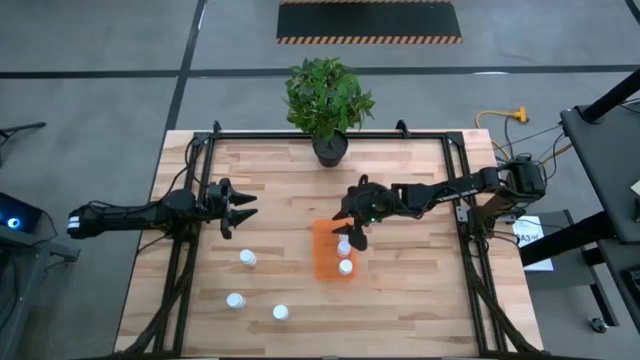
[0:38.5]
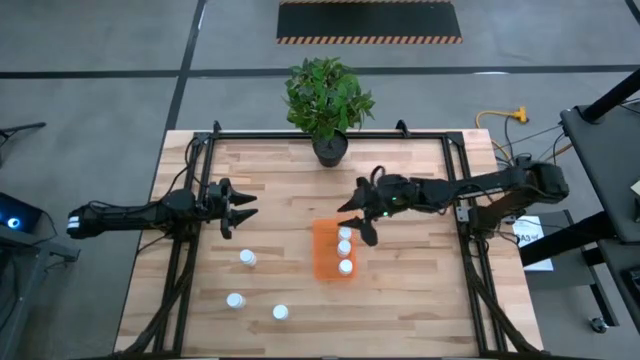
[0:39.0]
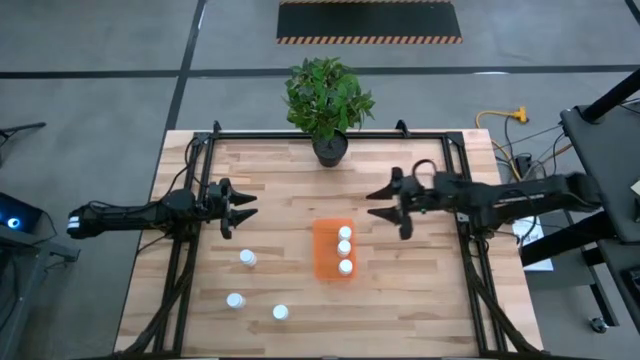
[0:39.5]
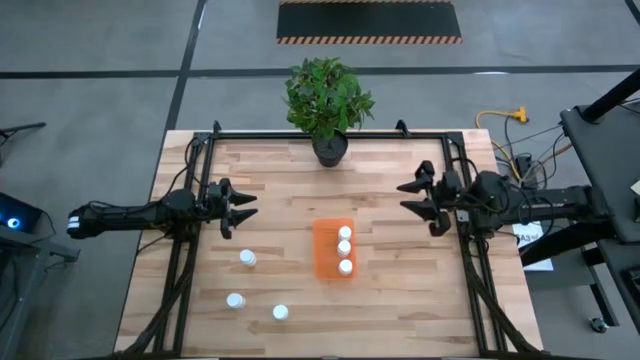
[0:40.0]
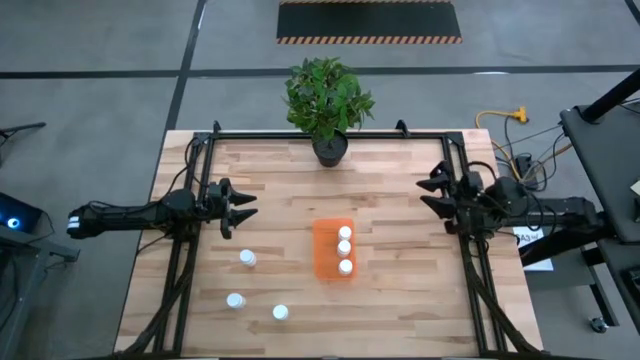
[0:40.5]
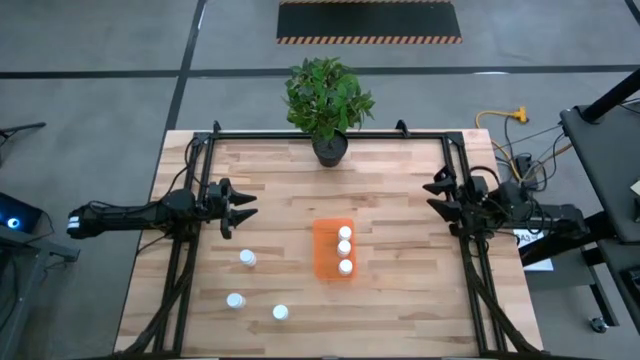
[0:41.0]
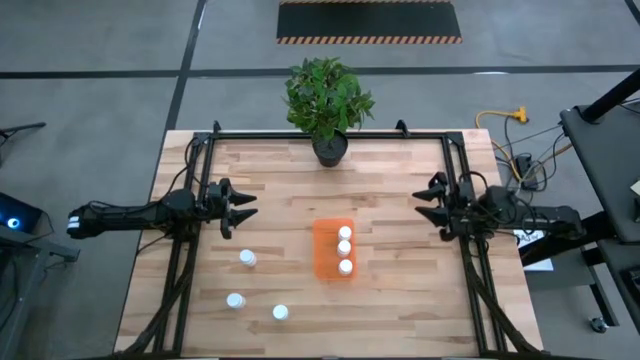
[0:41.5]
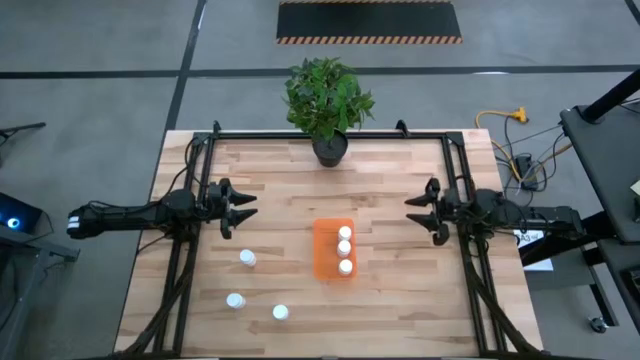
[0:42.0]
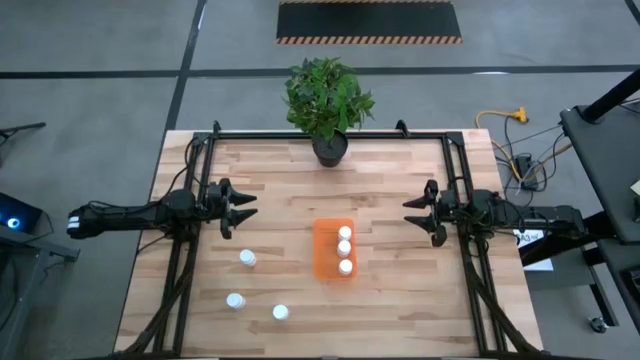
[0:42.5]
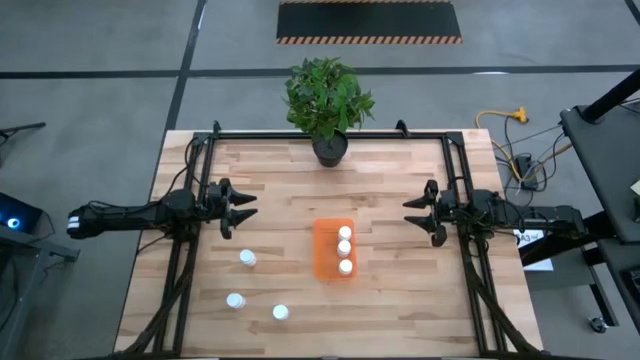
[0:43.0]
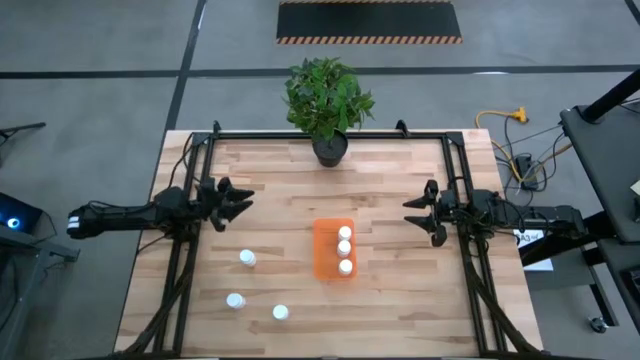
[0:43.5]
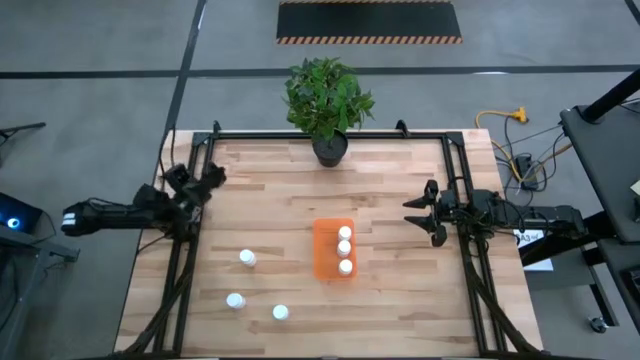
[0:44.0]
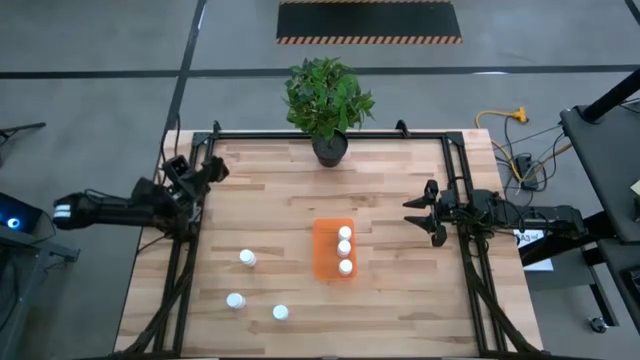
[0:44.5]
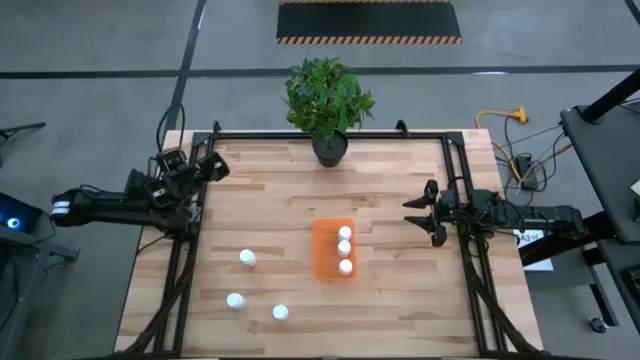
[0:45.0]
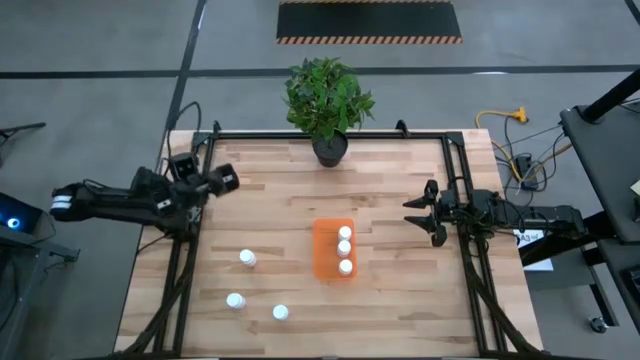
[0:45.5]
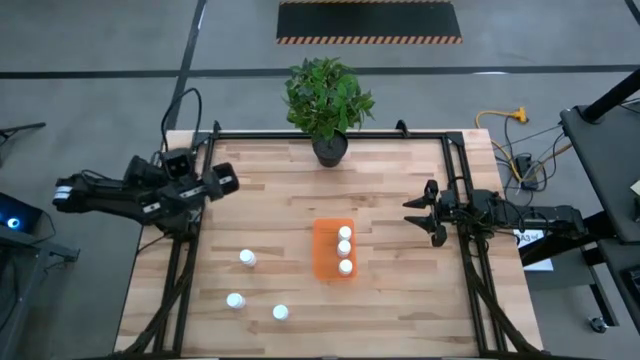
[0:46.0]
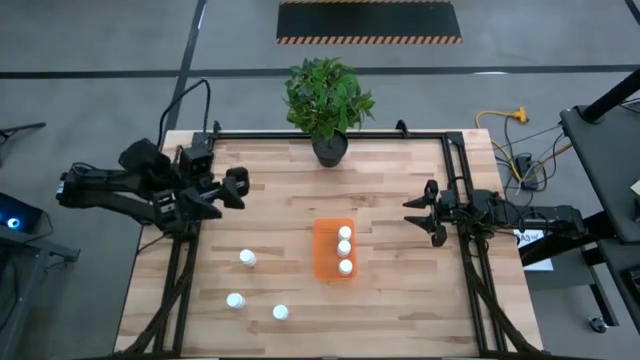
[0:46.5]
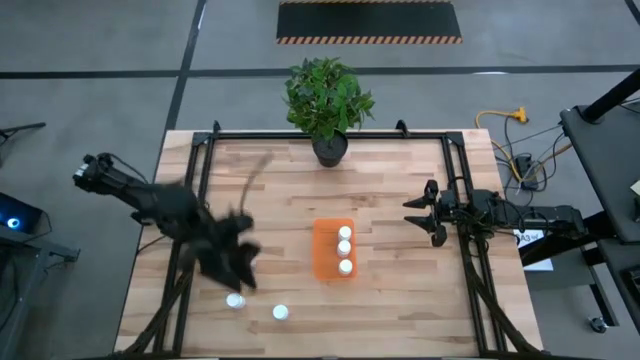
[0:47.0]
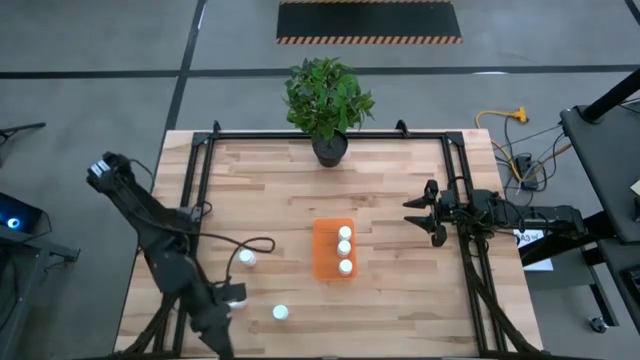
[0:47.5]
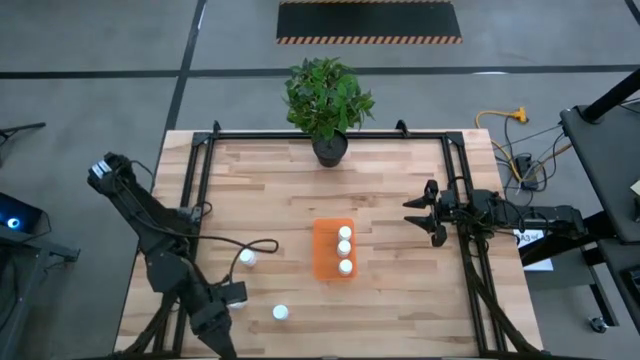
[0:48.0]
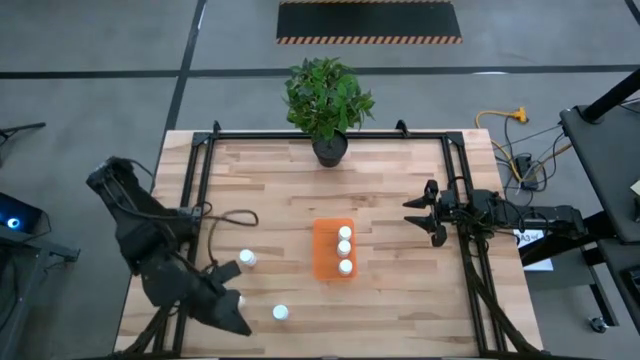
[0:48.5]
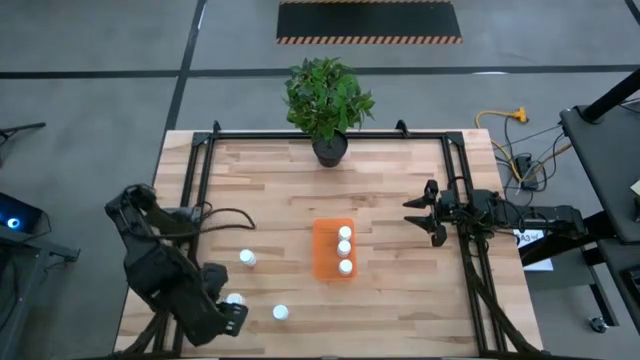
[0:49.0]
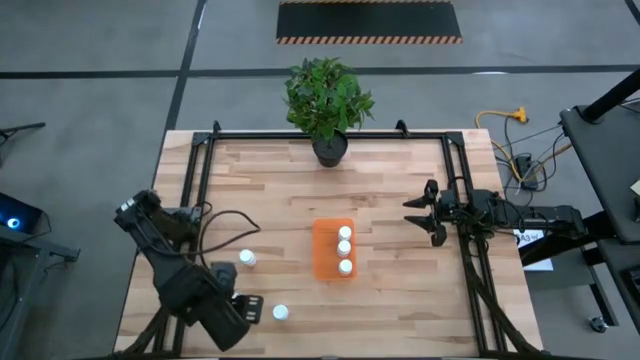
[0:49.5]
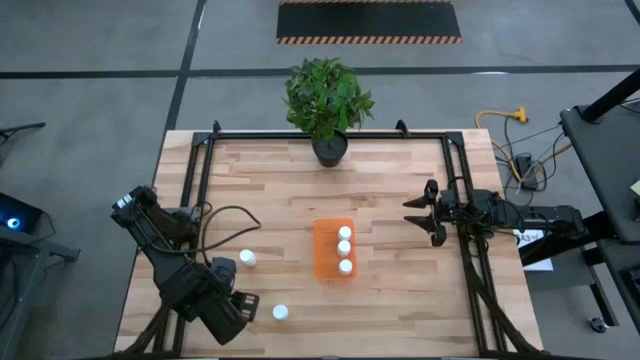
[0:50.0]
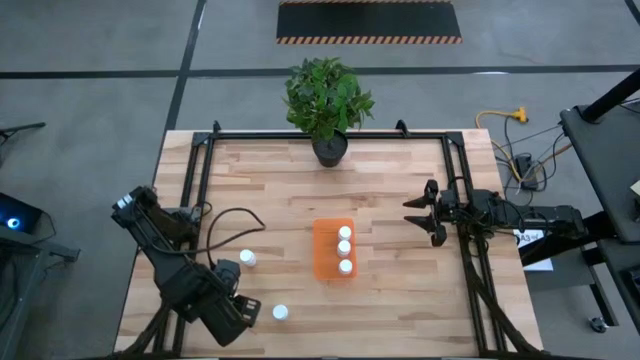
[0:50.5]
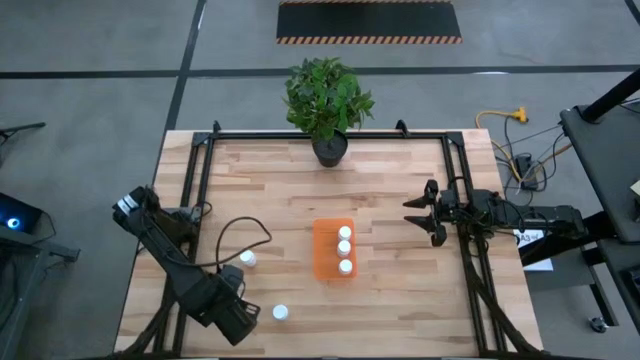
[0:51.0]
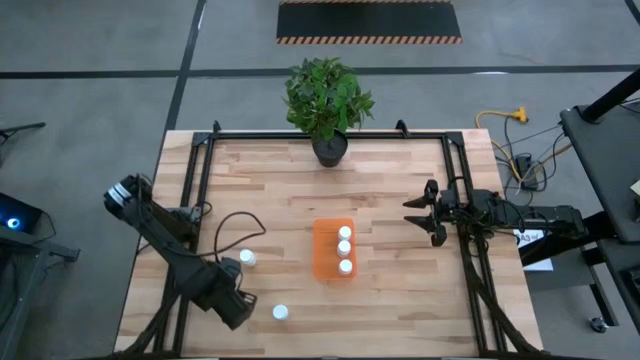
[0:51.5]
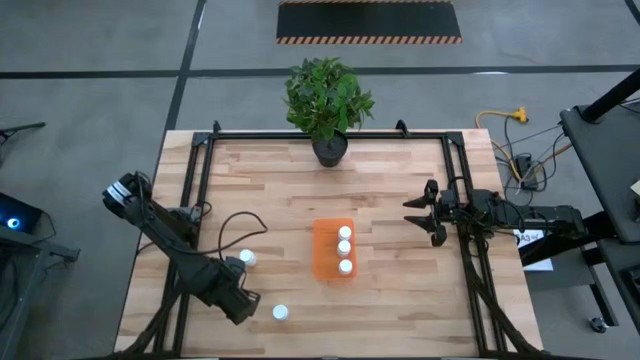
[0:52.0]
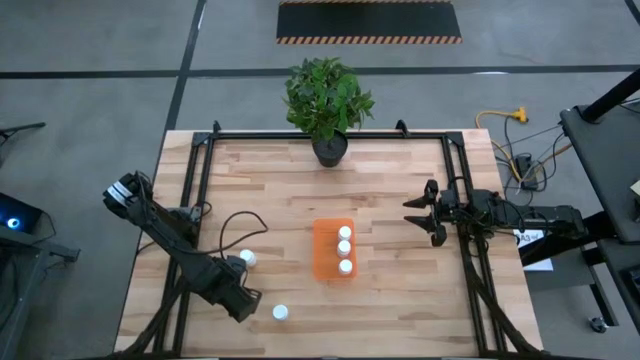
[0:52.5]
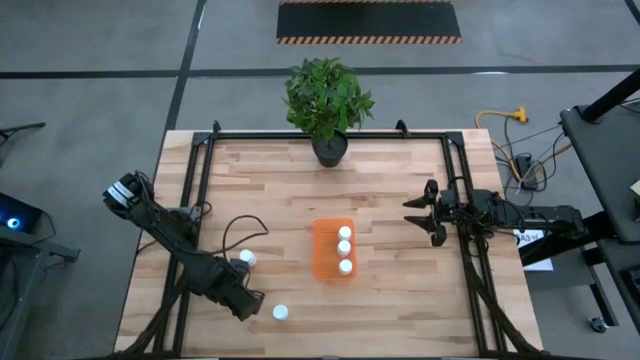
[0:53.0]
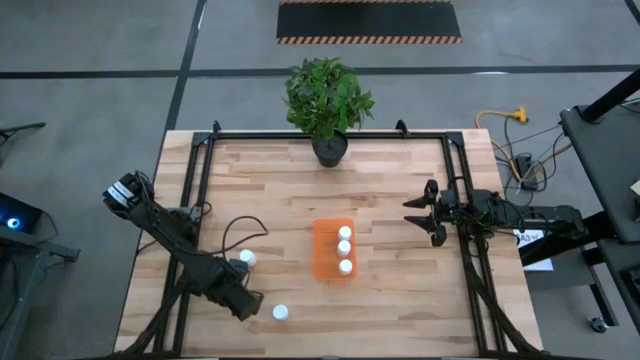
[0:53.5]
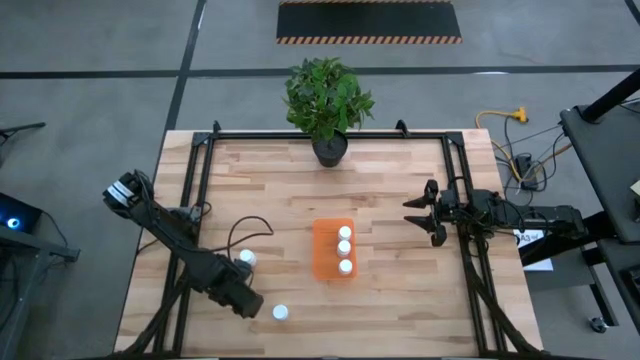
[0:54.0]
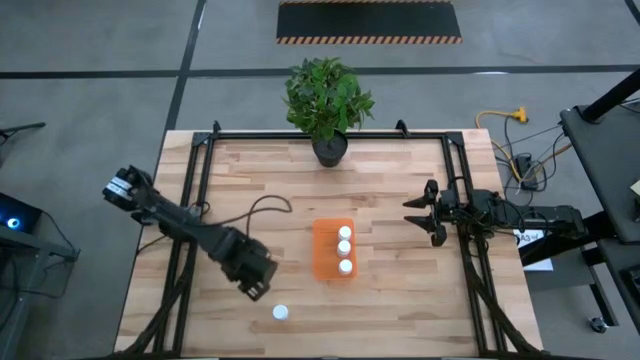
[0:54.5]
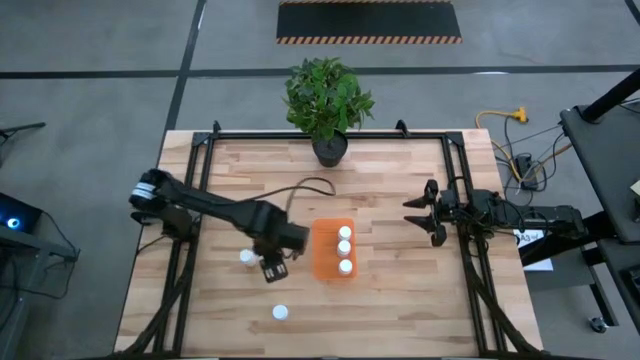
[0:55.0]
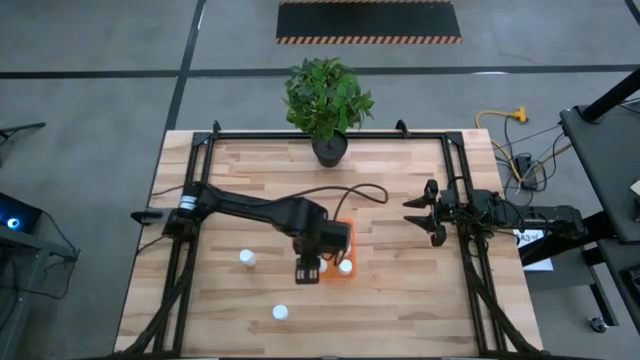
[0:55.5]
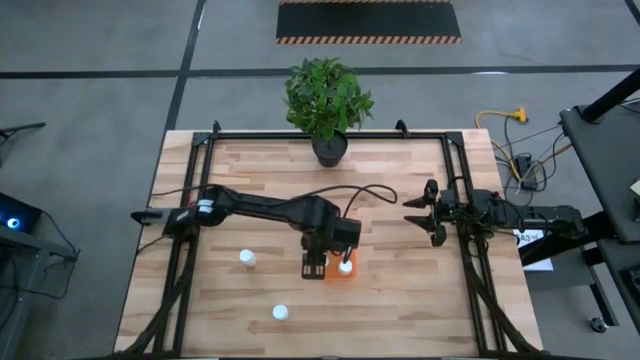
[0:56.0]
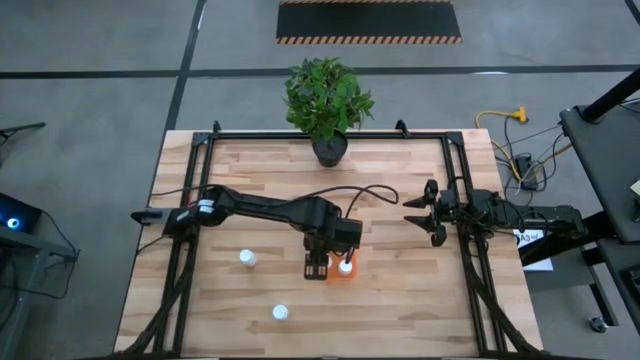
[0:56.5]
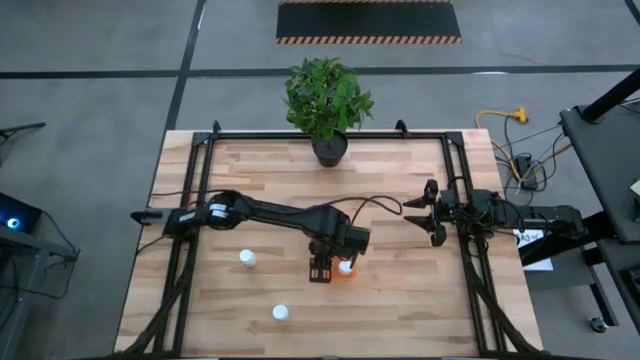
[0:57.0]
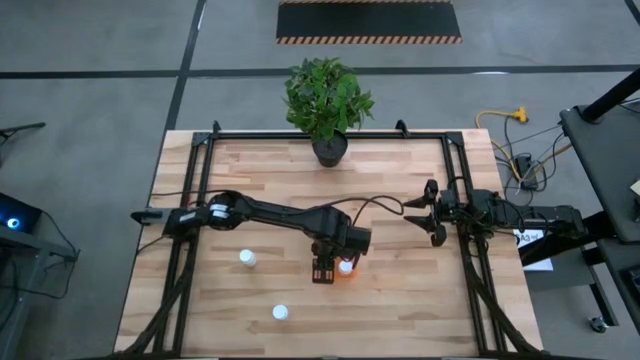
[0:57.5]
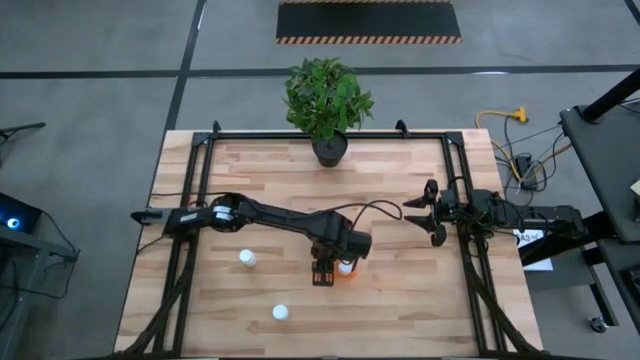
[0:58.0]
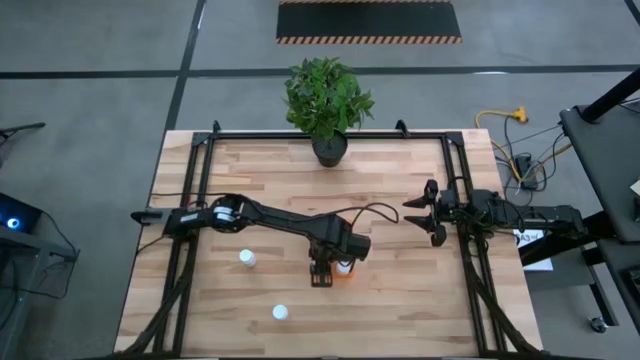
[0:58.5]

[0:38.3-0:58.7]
Task: Pick and place pill bottles into a basket
Put the white pill bottle into the orange bin
